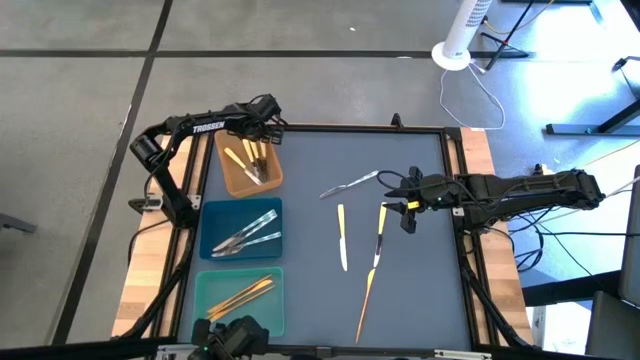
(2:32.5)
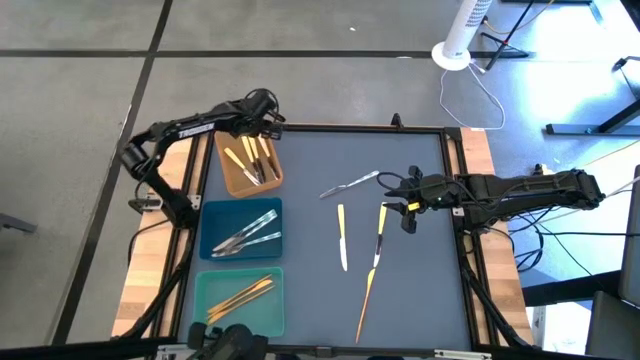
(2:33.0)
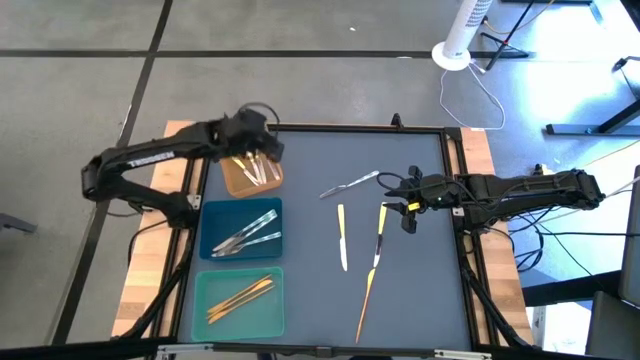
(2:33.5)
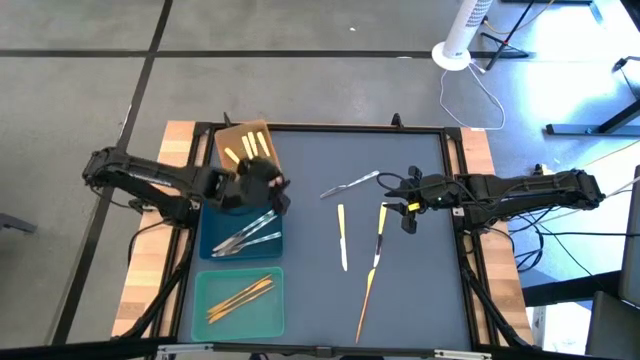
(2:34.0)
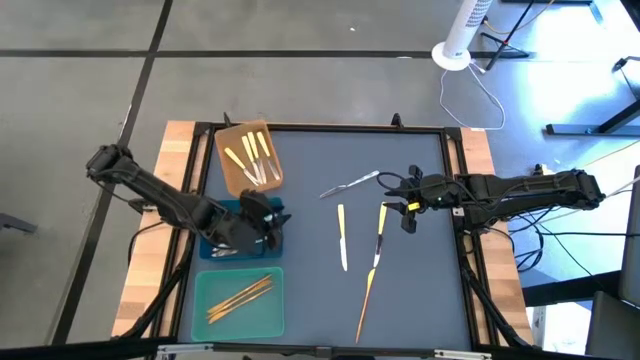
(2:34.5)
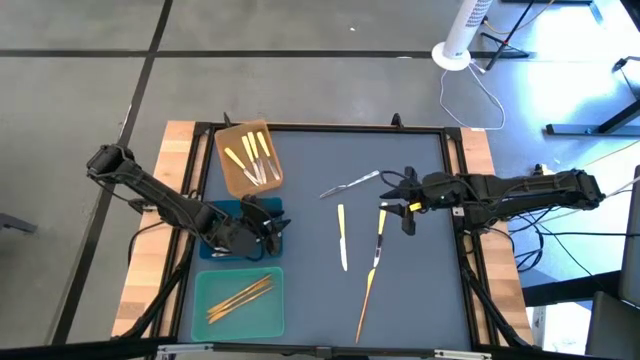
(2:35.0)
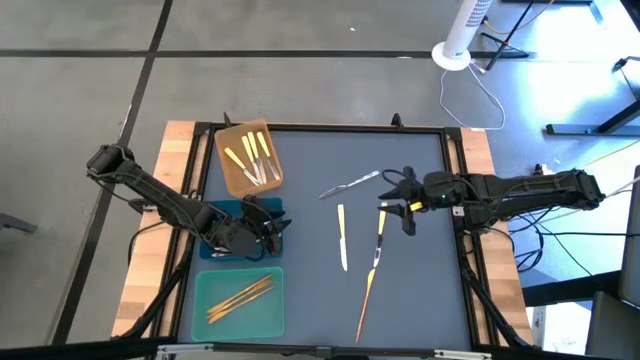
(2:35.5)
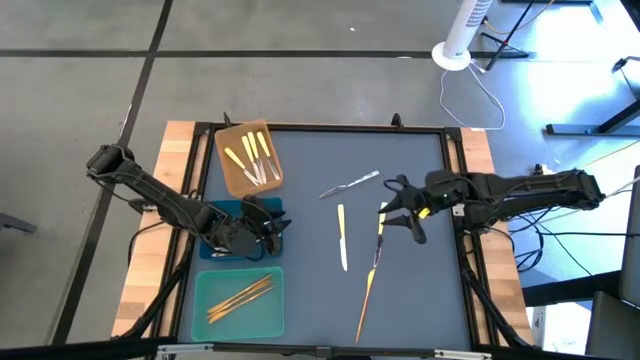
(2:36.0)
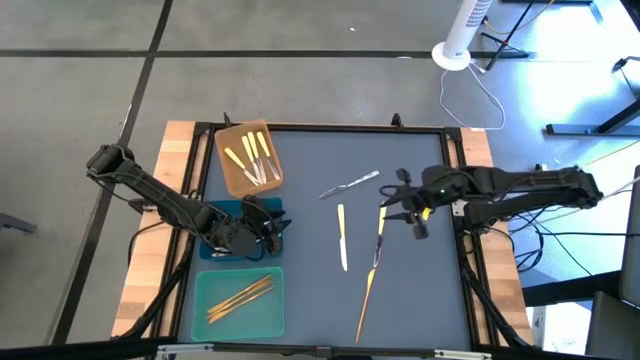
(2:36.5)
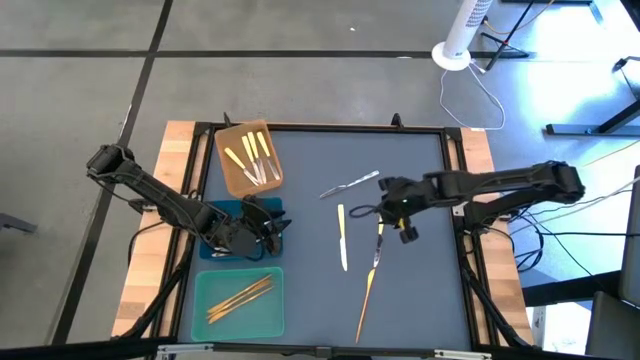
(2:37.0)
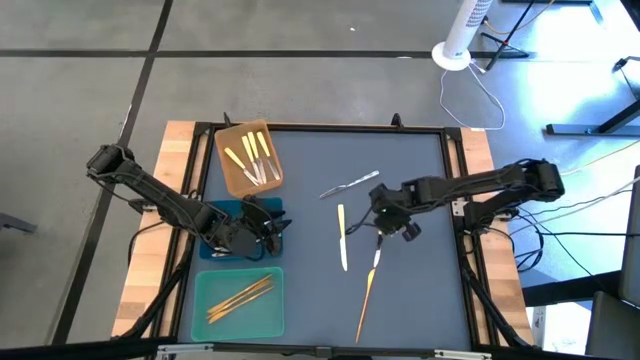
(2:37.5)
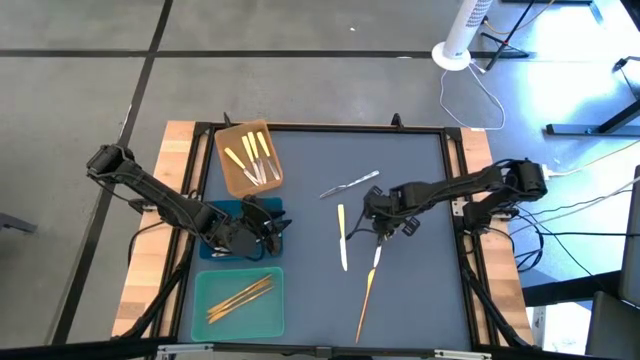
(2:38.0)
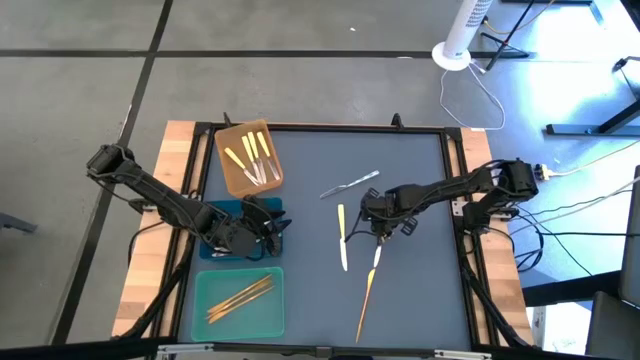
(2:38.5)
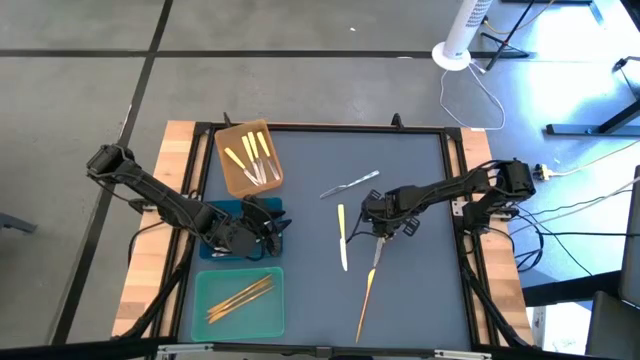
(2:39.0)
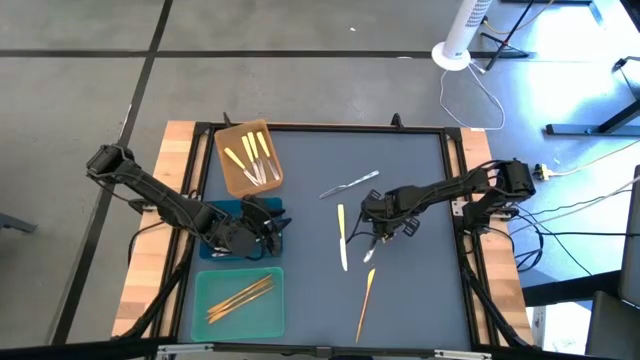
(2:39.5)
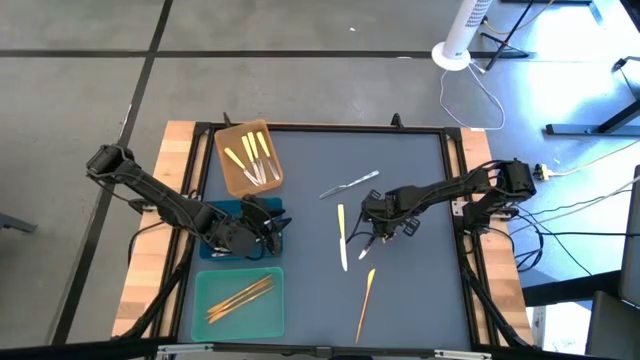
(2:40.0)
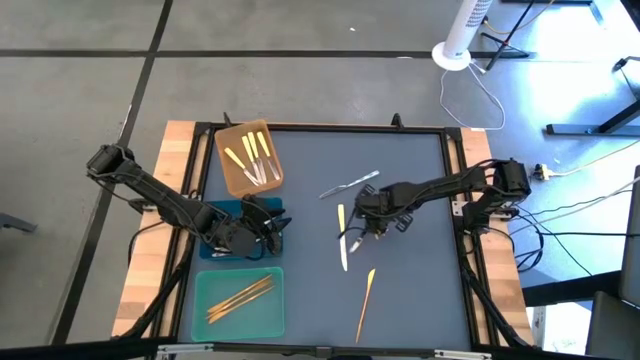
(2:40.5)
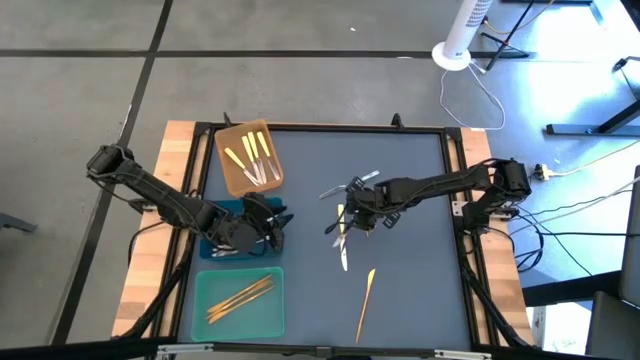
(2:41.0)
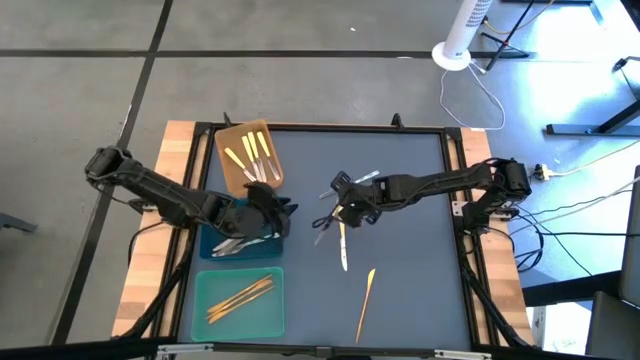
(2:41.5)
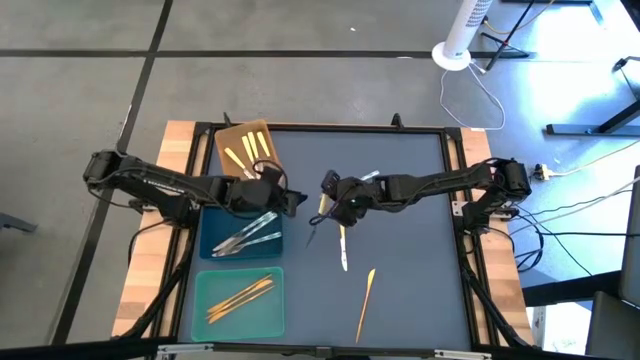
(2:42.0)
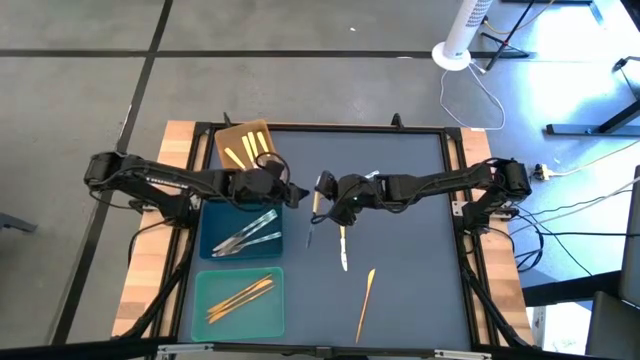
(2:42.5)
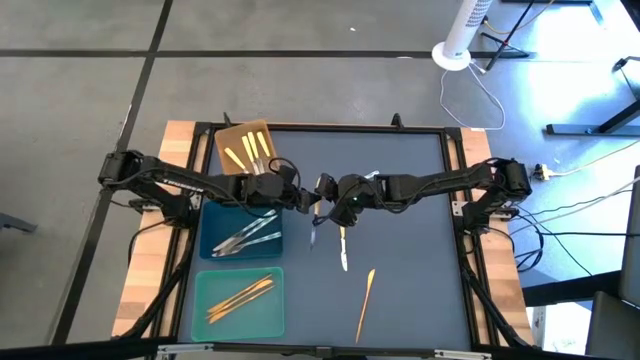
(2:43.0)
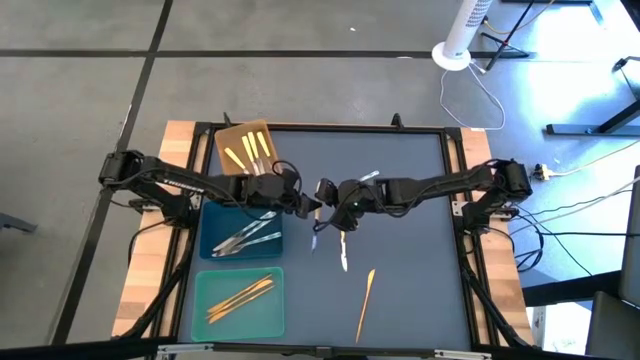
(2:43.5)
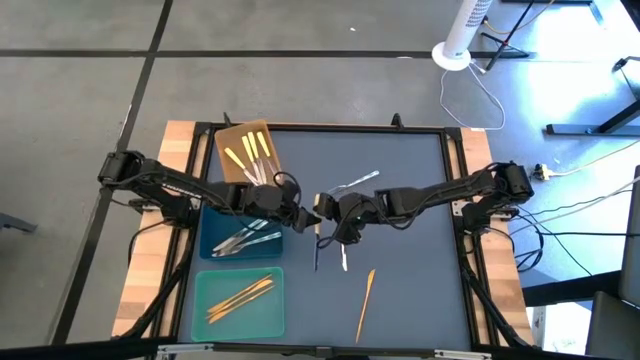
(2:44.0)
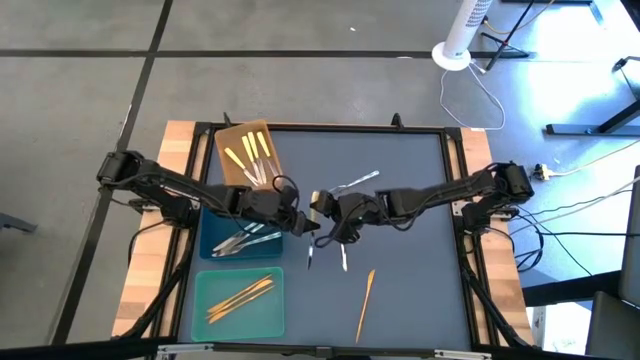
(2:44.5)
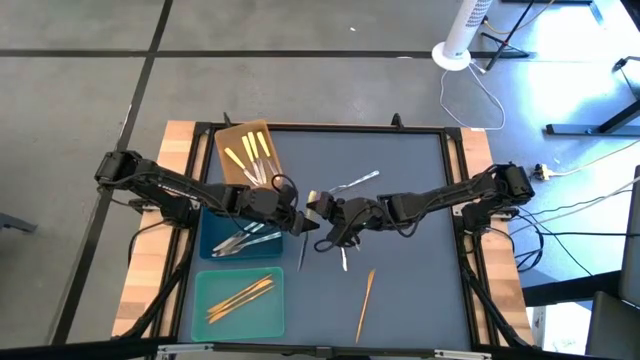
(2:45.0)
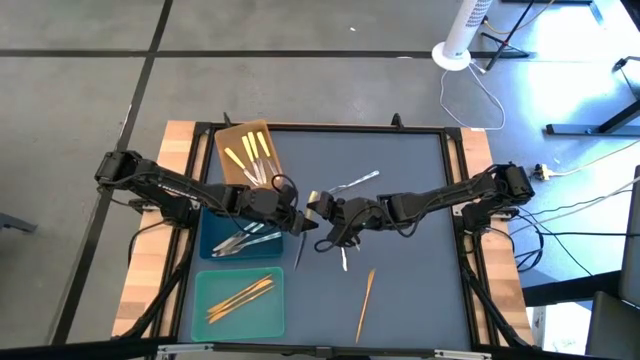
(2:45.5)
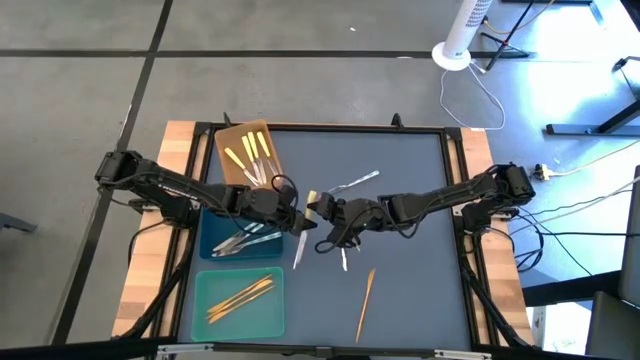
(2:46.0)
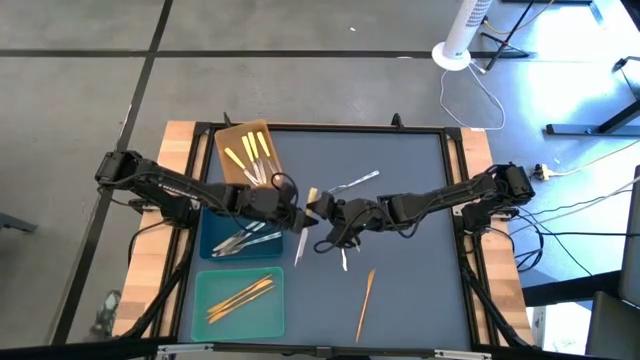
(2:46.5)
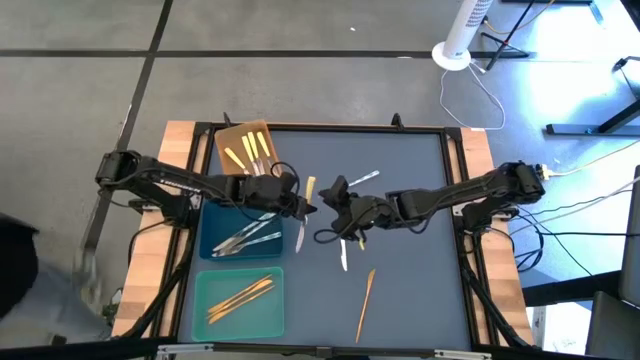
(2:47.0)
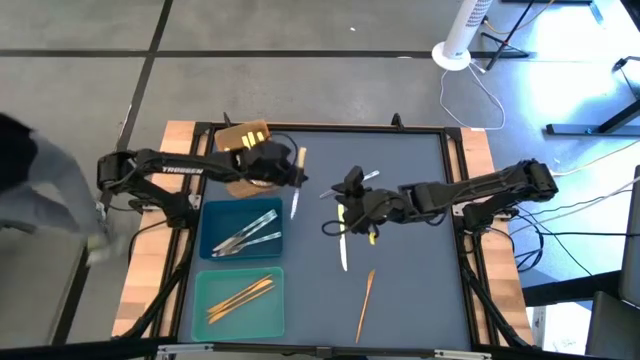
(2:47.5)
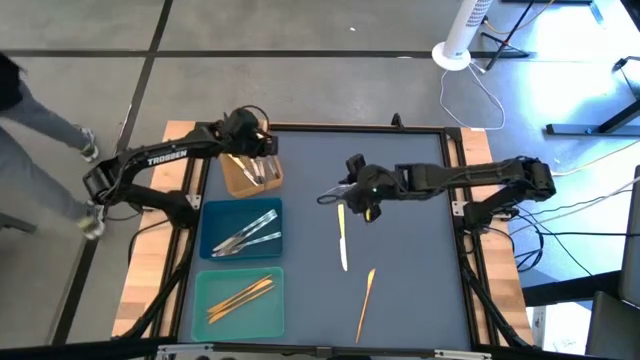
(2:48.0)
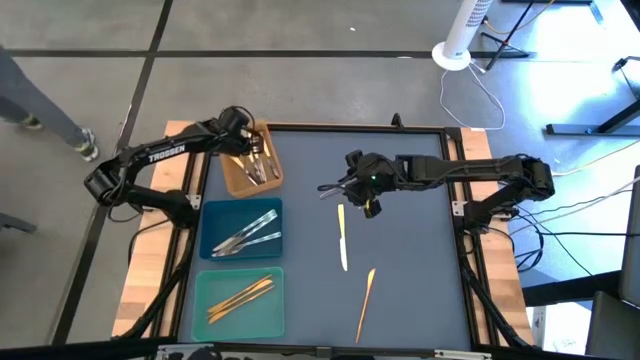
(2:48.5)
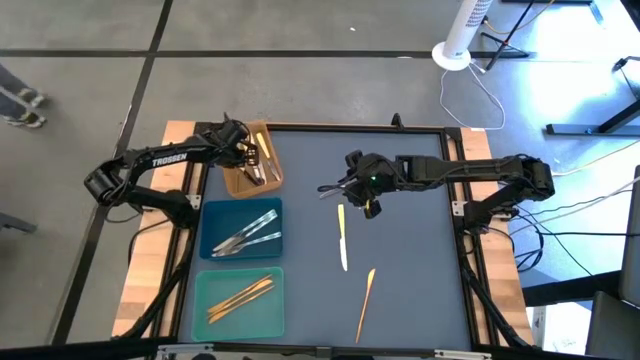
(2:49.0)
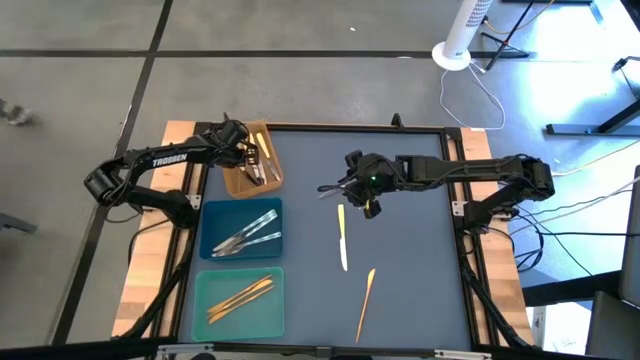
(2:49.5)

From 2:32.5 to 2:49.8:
Task: Sort silverware by color (type)
Put the yellow knife into the orange bin

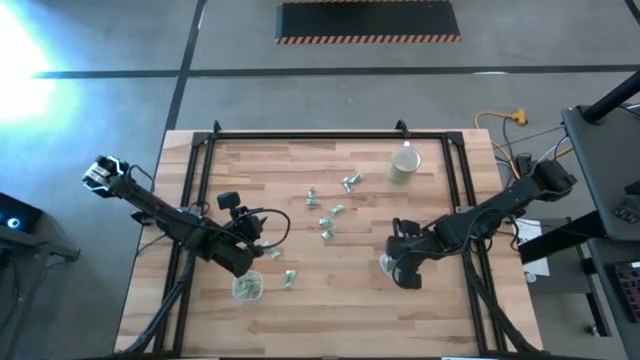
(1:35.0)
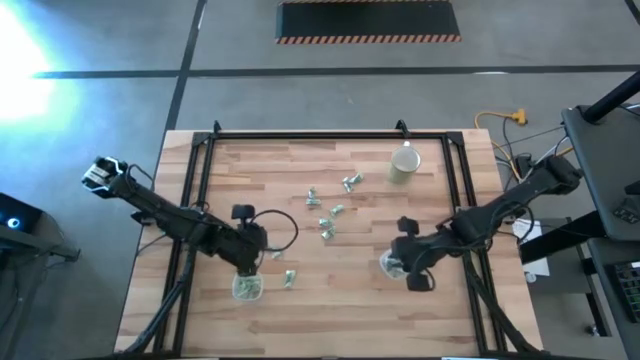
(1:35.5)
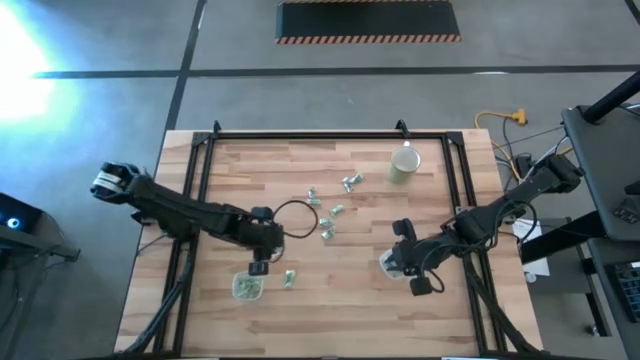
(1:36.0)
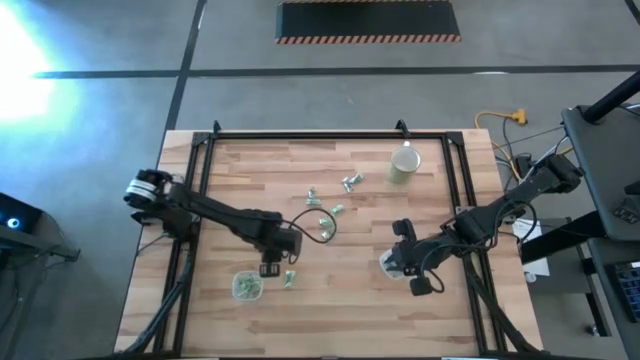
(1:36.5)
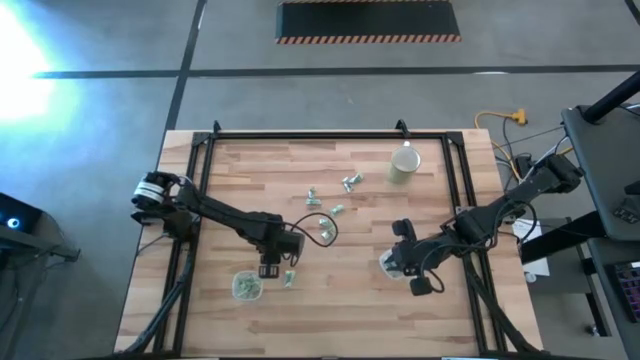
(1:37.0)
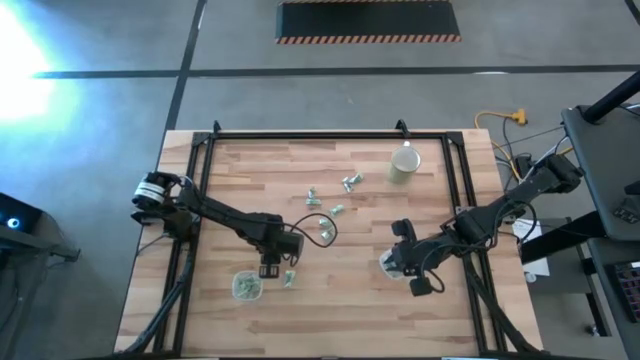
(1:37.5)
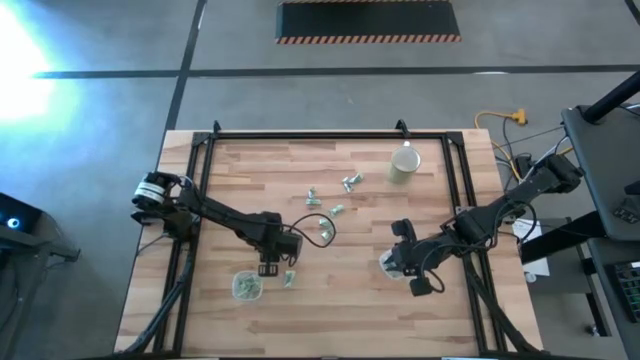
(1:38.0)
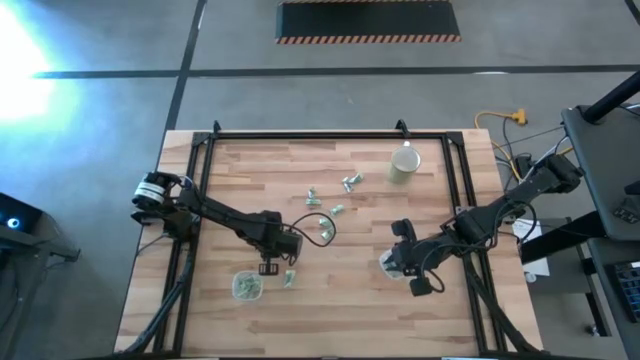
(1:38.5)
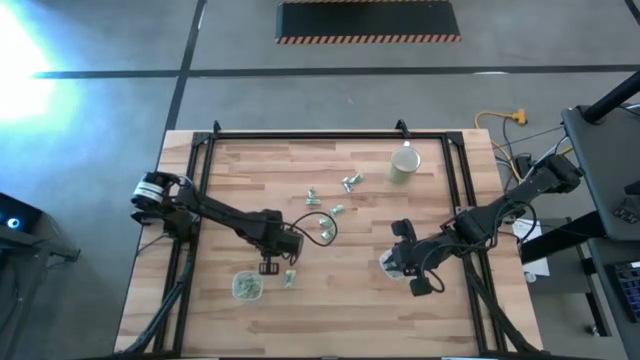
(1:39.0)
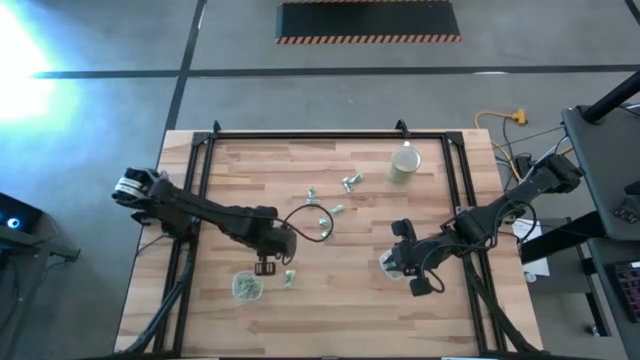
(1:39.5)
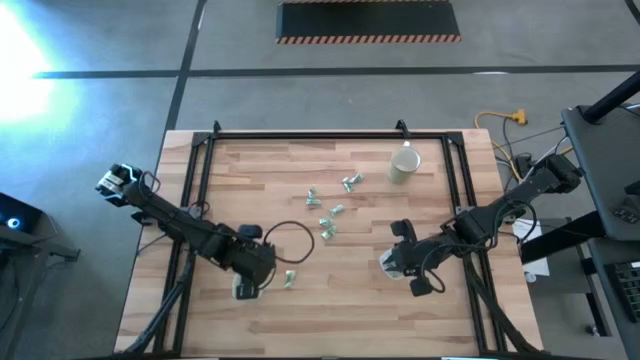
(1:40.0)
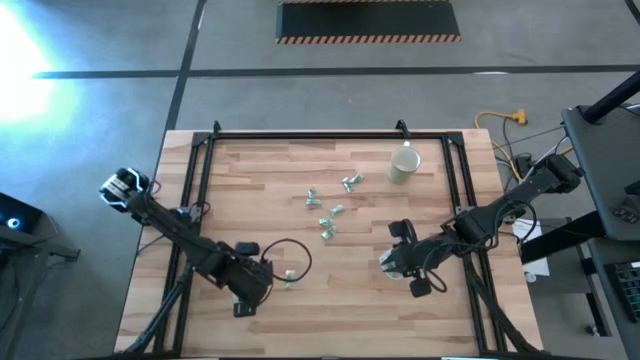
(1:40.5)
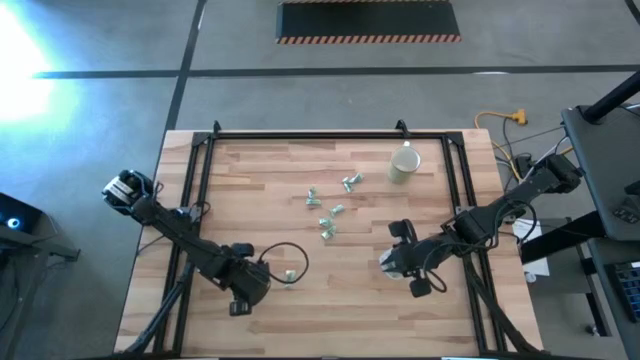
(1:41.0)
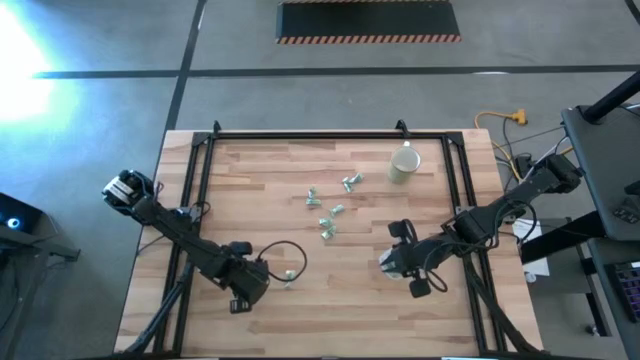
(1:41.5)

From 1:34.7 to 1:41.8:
Task: Pick and place Stevia / Truvia into bins
Put the stevia packet into the left transparent container
